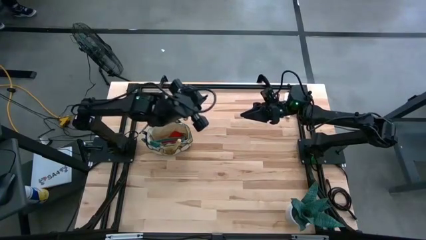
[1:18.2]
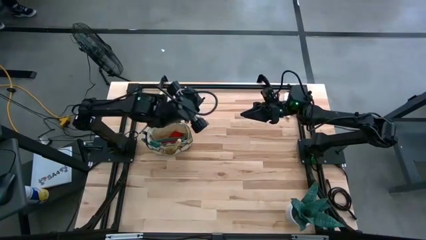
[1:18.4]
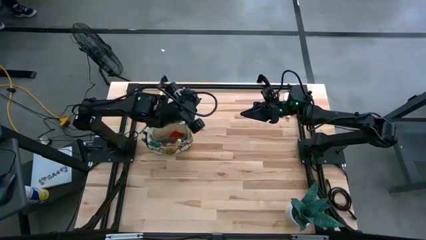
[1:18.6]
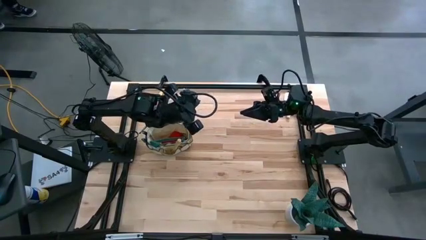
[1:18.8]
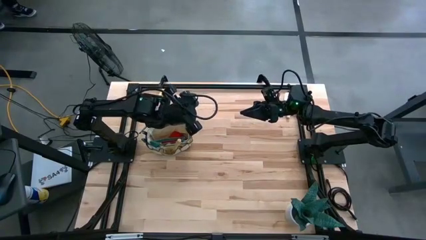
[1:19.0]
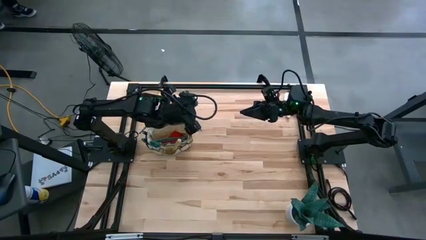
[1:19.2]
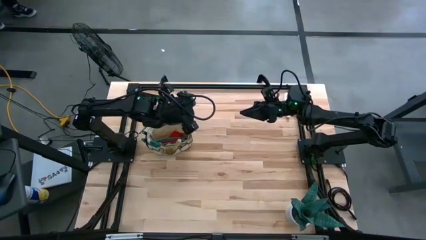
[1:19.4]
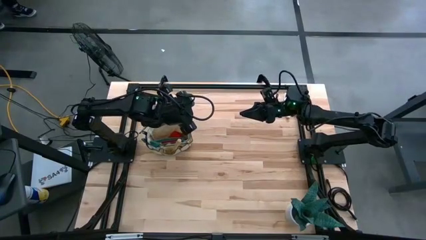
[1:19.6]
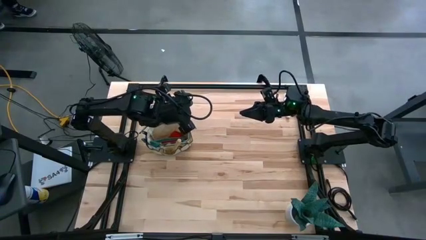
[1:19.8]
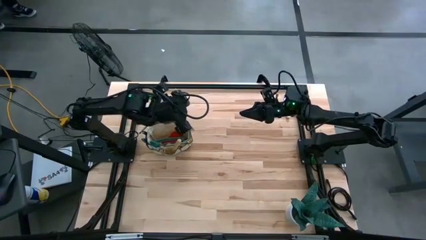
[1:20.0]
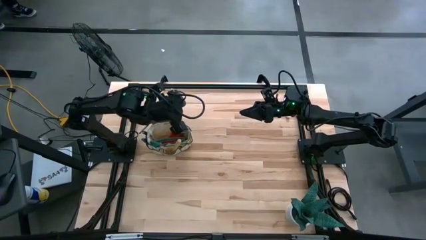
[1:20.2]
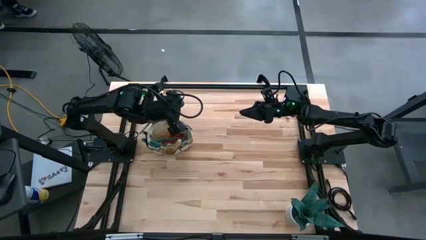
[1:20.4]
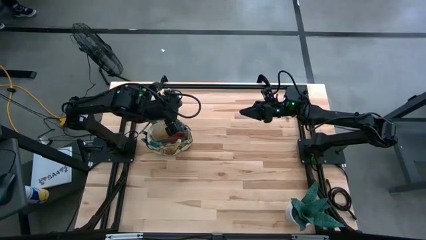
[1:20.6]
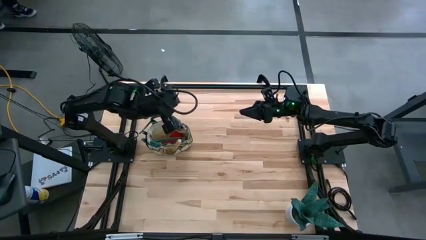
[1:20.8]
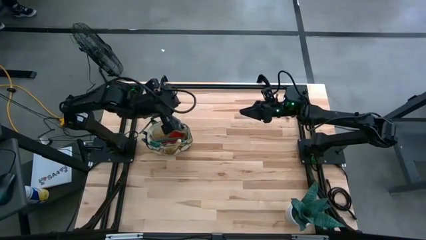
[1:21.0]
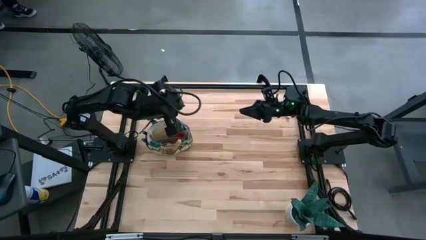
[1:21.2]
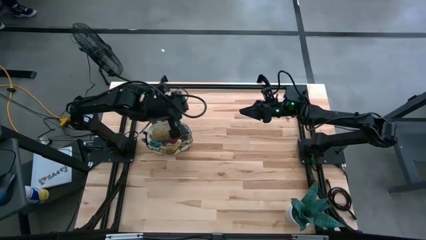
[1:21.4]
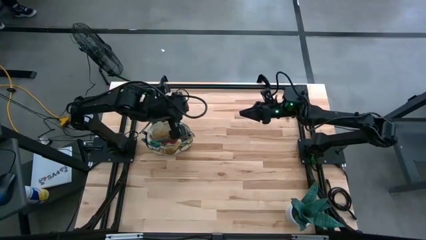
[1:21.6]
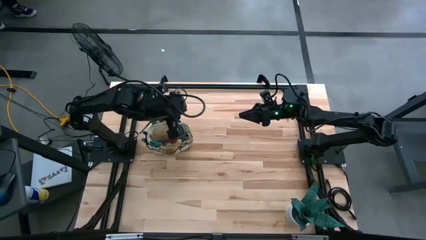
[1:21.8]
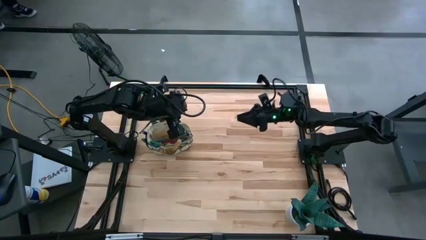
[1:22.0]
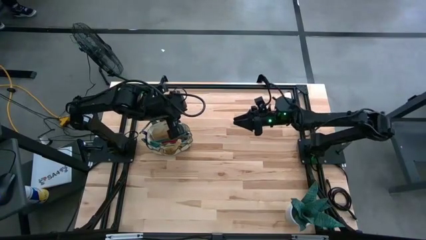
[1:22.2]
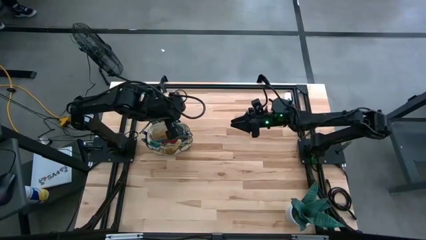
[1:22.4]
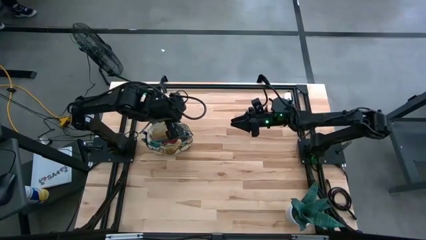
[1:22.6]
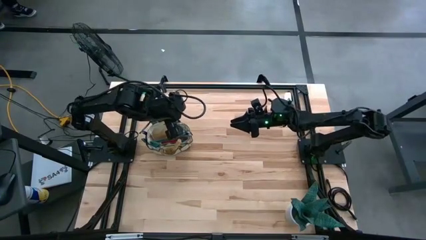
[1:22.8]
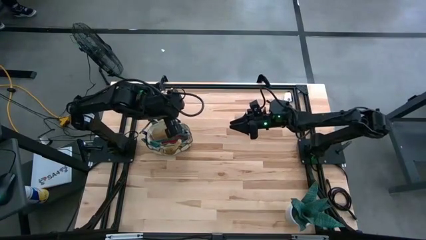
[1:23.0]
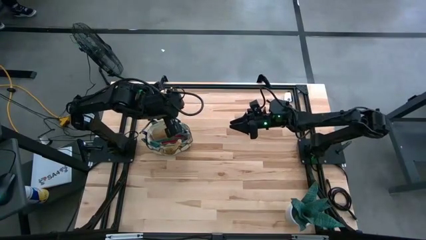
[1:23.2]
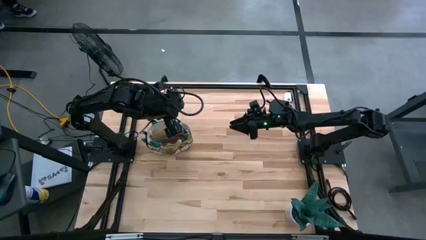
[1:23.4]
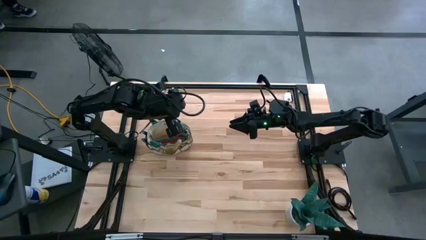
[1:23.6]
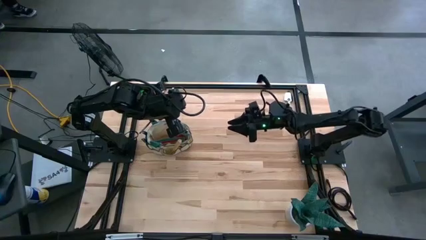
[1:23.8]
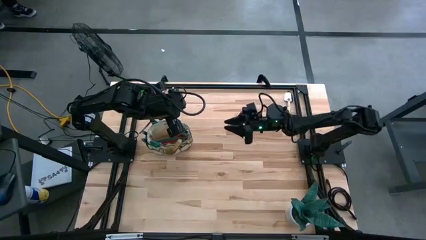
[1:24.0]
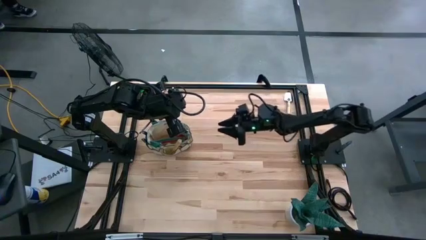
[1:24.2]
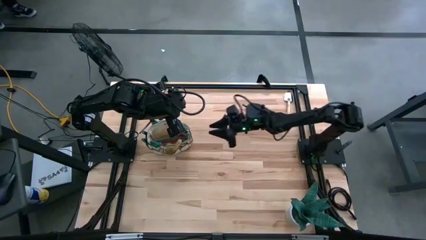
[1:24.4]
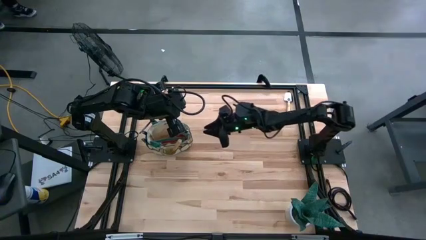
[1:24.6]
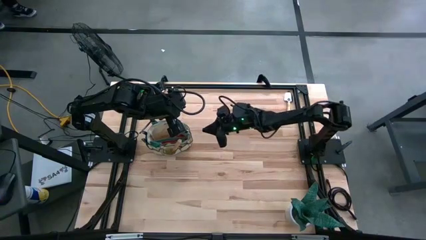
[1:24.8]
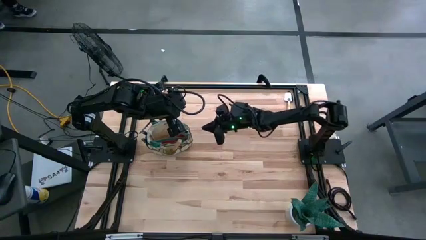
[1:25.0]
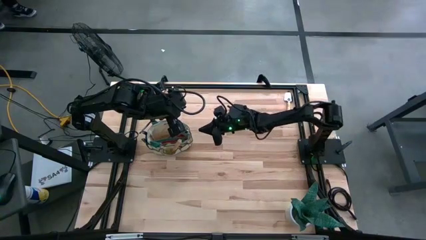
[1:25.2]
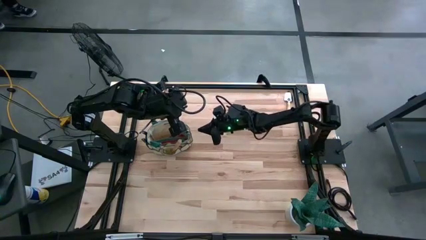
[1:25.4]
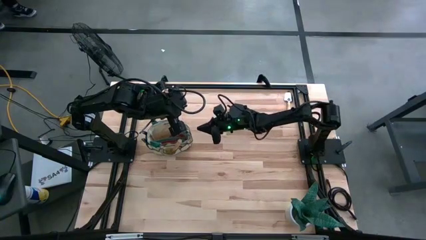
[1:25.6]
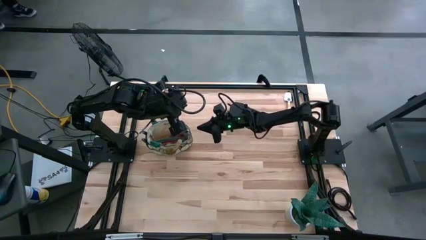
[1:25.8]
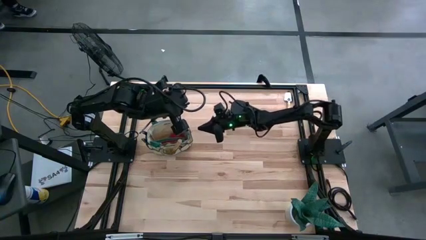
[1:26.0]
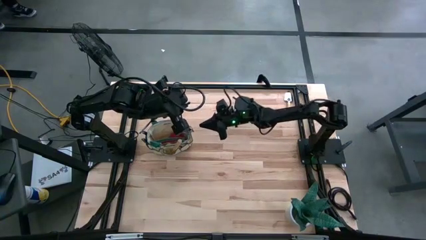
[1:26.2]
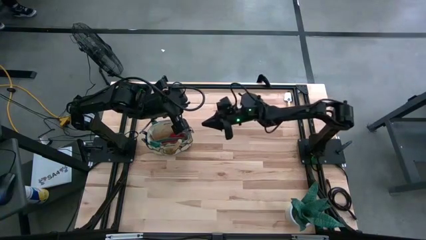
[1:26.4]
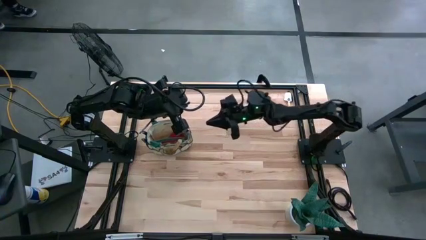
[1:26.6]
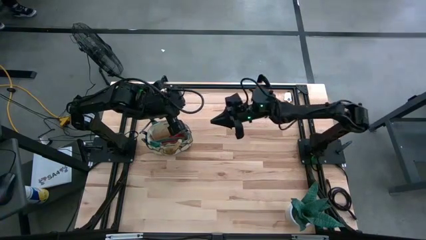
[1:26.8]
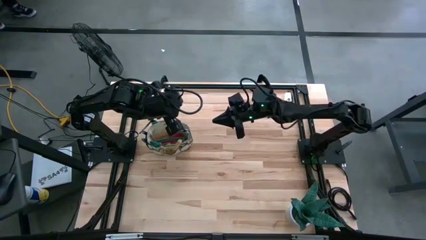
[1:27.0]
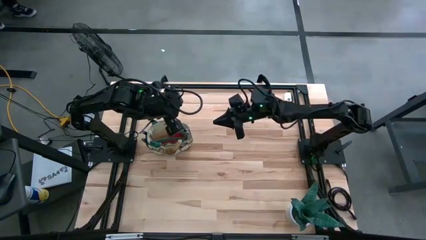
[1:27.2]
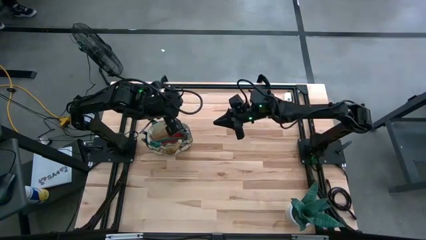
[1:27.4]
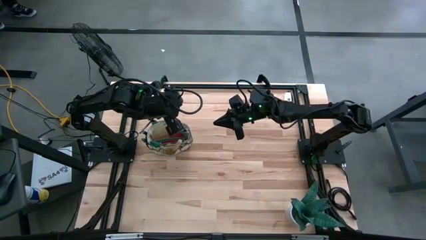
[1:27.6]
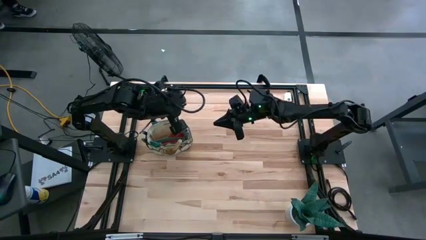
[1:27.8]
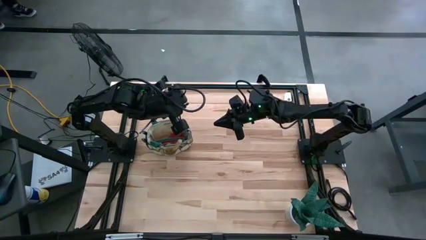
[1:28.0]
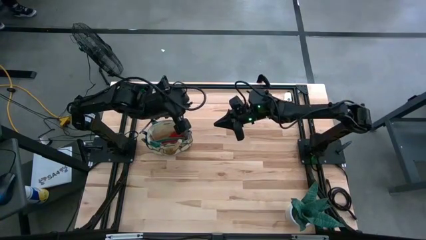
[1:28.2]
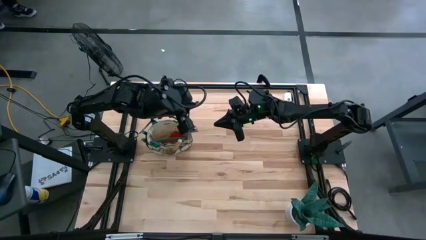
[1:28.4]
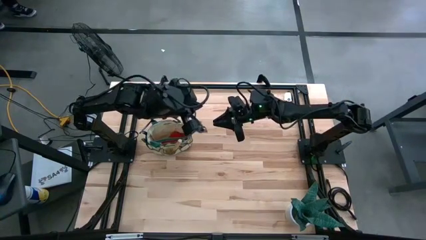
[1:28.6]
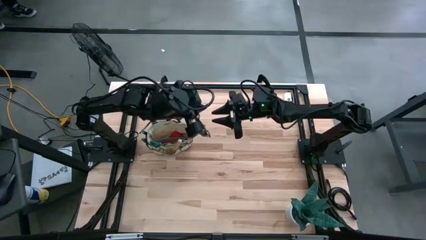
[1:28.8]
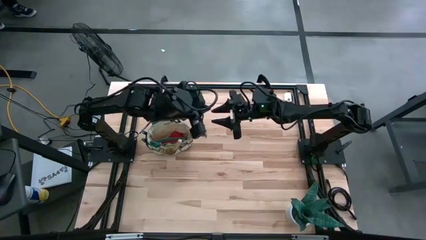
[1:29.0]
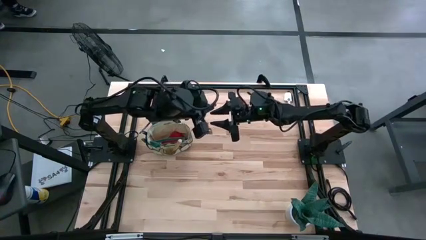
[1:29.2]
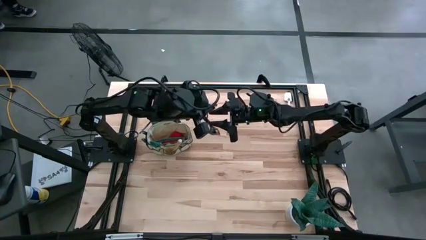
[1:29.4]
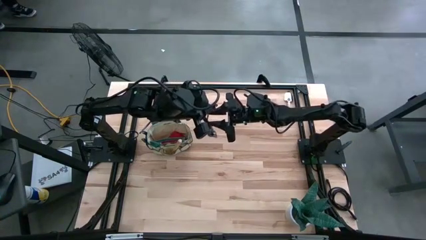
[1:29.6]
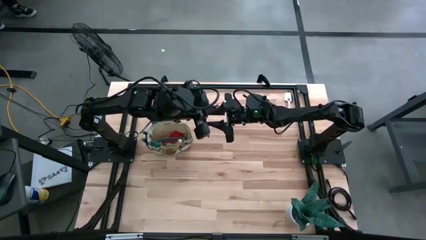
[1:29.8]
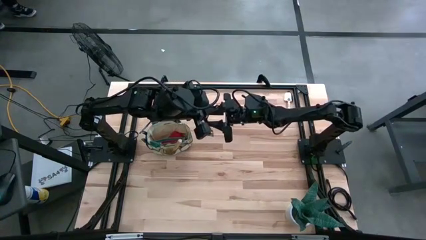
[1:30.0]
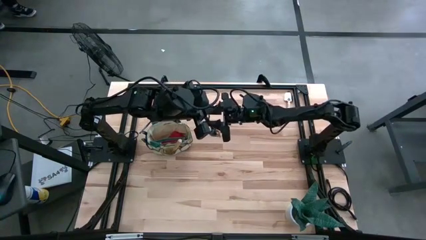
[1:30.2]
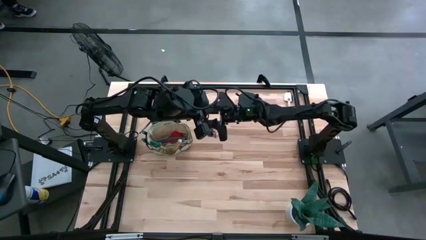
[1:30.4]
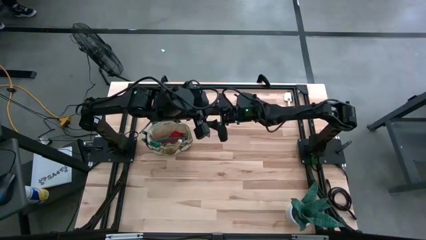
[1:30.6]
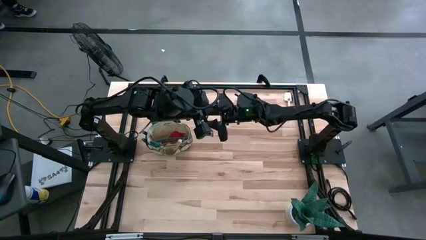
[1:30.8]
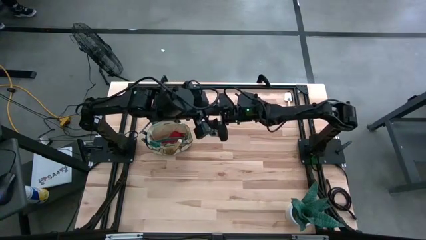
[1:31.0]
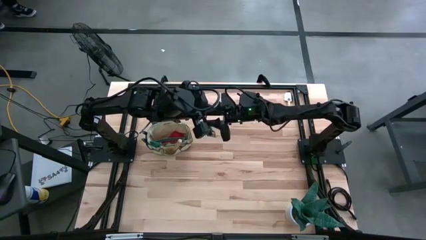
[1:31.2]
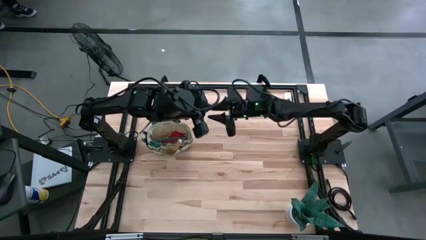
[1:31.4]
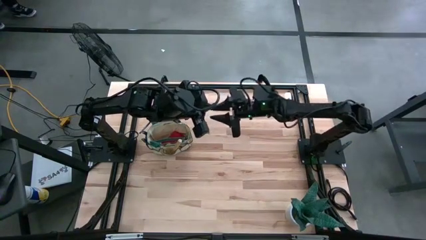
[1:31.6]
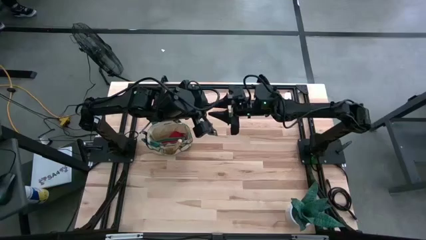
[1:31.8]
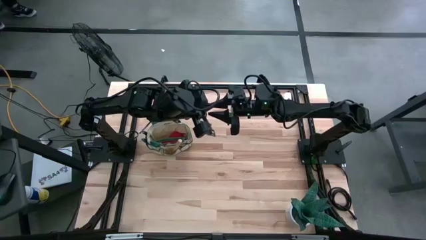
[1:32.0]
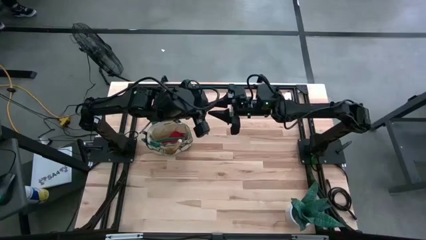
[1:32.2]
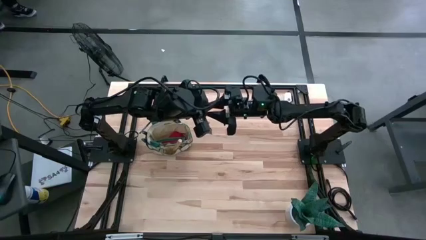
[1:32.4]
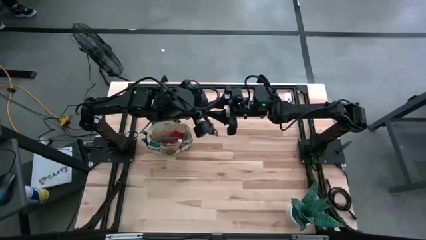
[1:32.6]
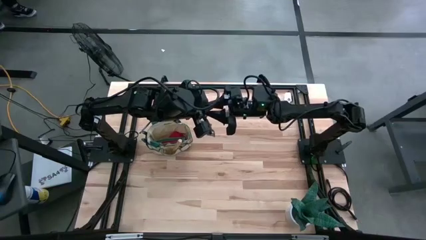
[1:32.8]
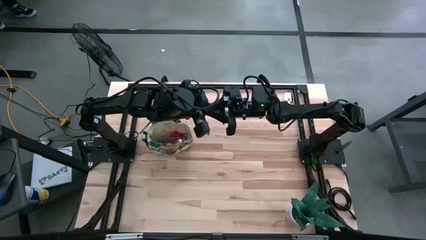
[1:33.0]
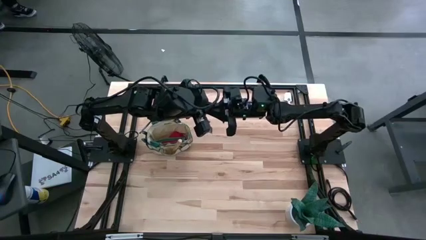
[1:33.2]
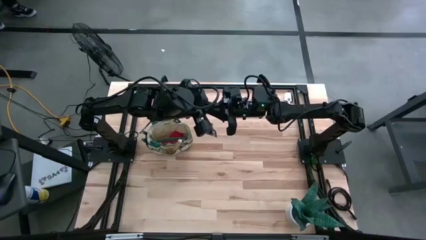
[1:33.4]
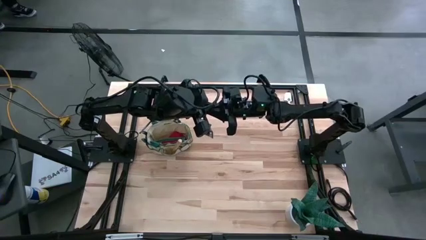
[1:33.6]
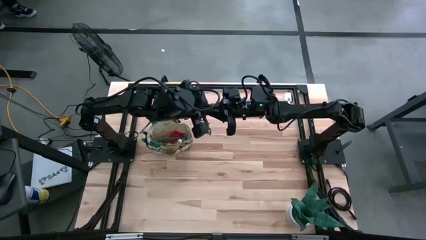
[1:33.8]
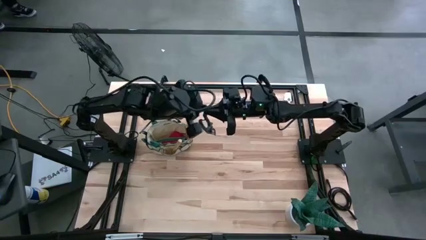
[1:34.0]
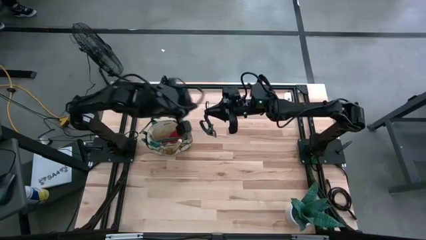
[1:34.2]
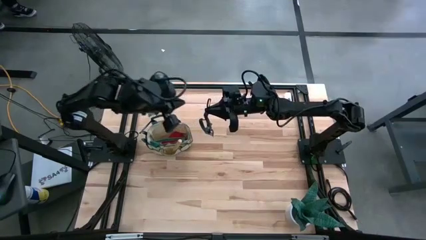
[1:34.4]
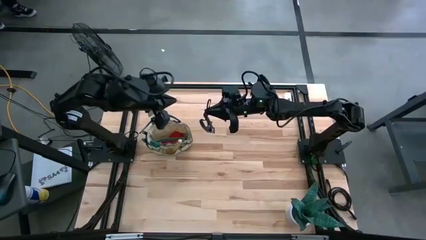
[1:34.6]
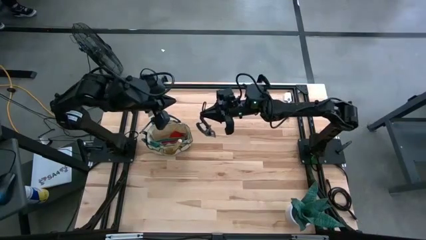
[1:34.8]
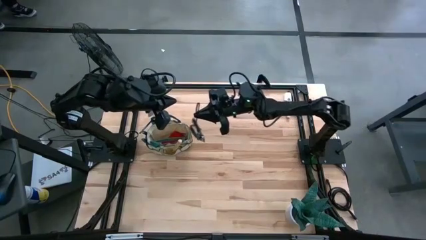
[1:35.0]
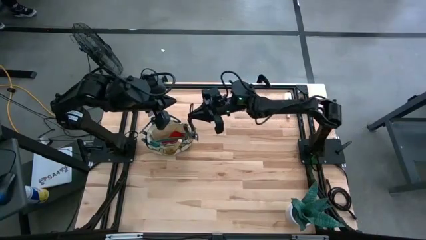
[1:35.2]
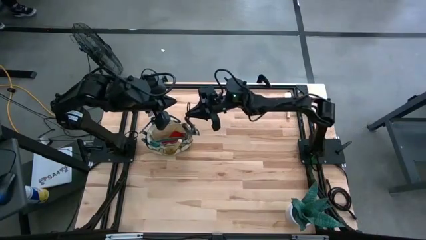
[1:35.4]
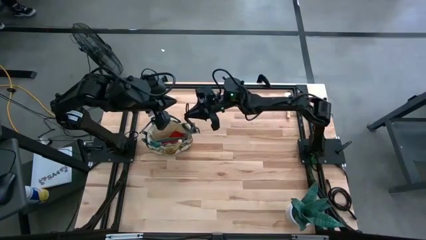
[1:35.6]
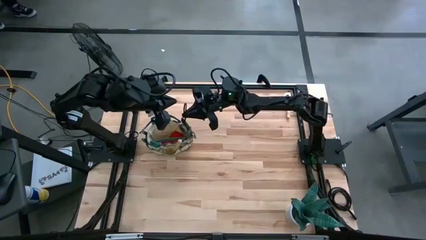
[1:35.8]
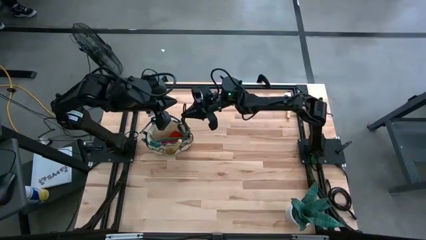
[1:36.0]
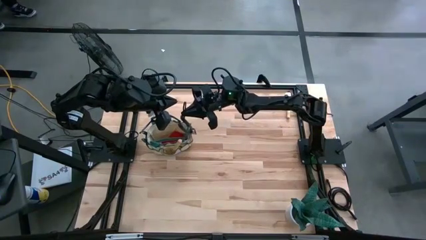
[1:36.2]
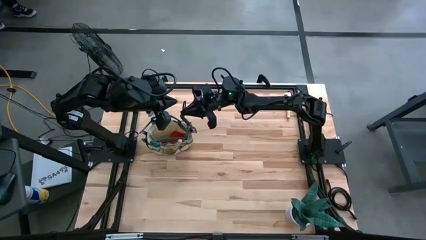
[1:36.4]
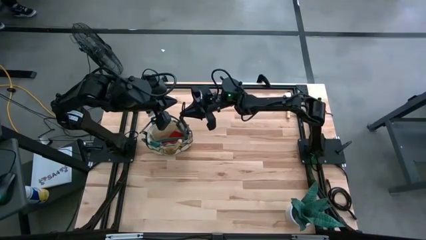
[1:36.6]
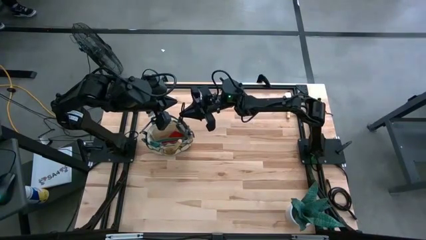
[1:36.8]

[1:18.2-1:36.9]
Task: Pick & Place Garden tools in Gardening bag
Put the green shear scissors into the white gardening bag
